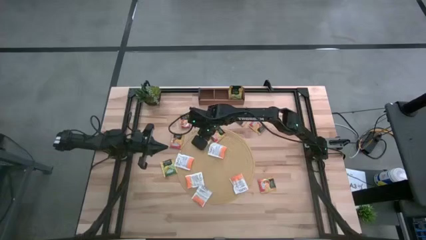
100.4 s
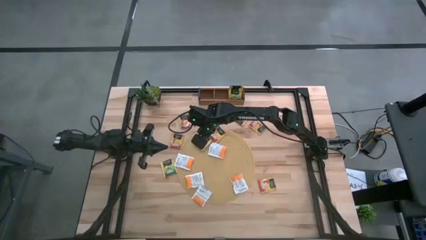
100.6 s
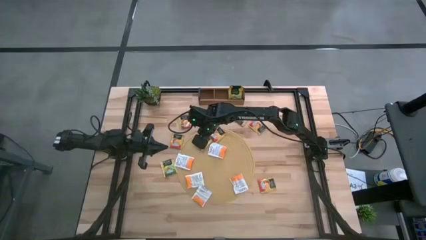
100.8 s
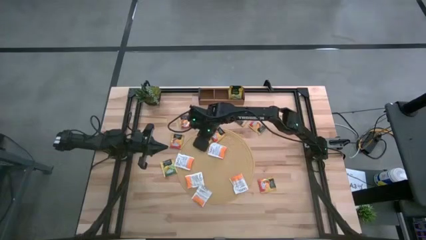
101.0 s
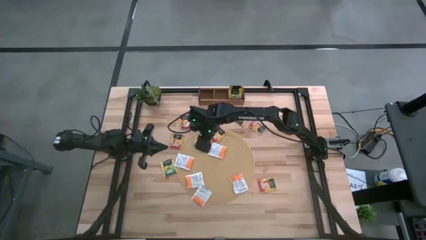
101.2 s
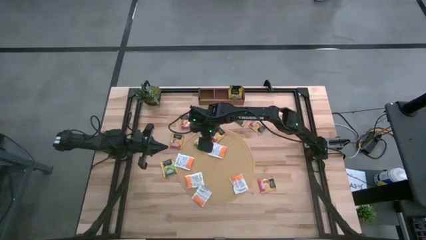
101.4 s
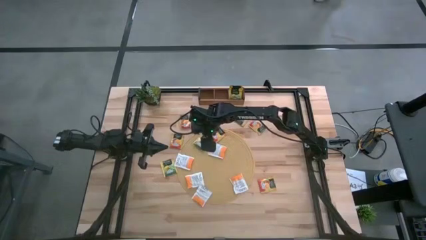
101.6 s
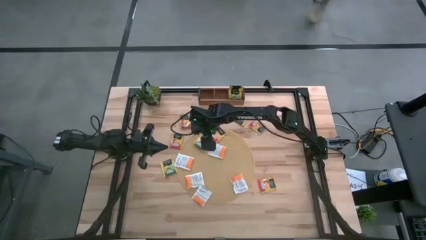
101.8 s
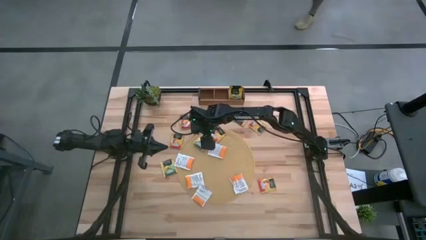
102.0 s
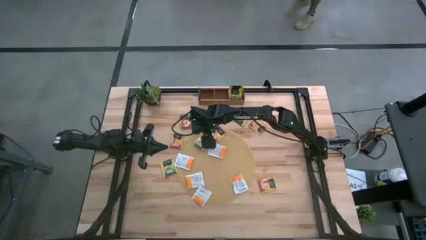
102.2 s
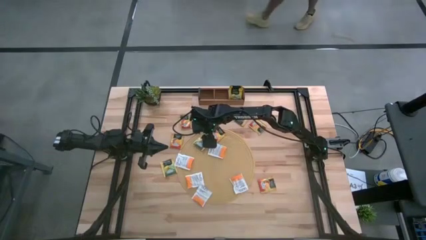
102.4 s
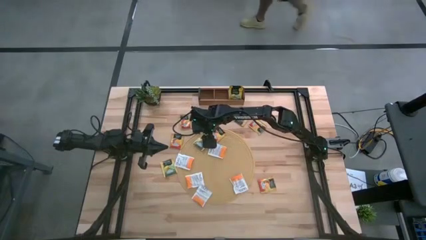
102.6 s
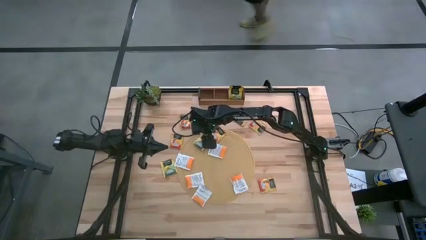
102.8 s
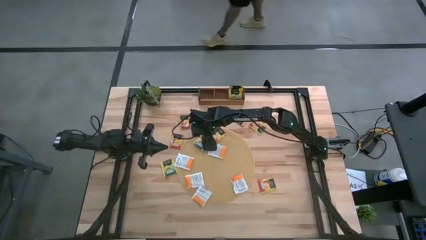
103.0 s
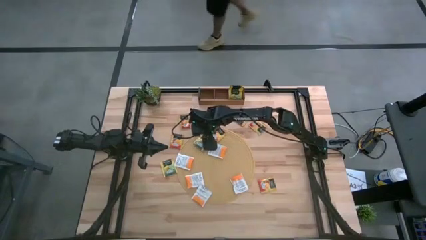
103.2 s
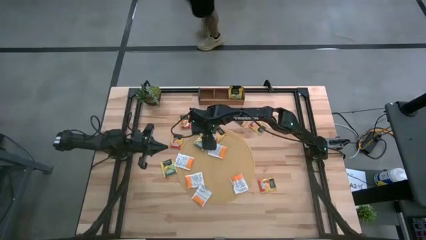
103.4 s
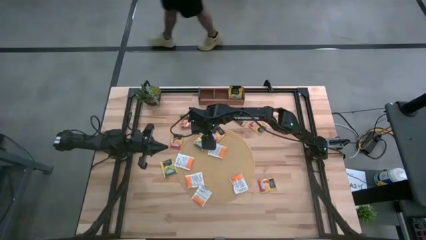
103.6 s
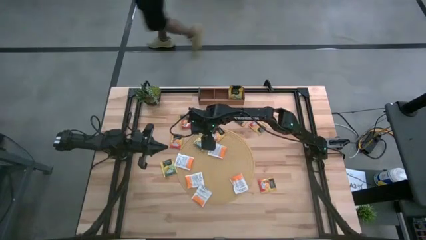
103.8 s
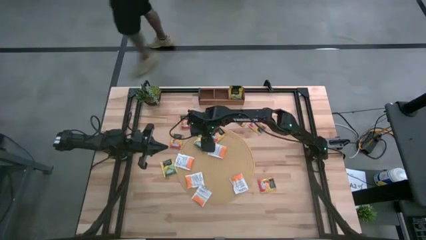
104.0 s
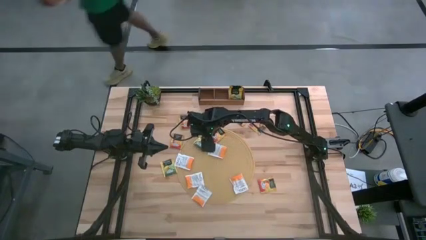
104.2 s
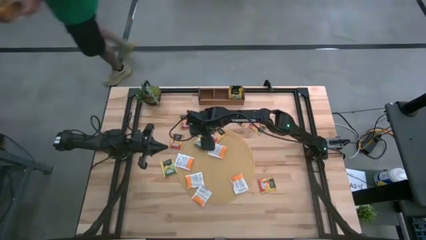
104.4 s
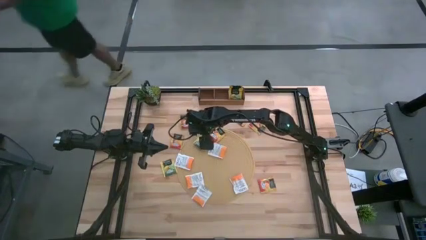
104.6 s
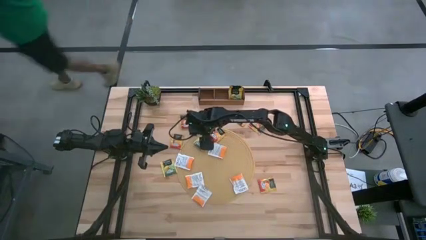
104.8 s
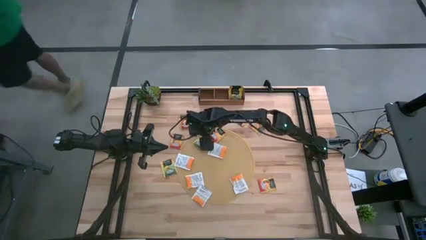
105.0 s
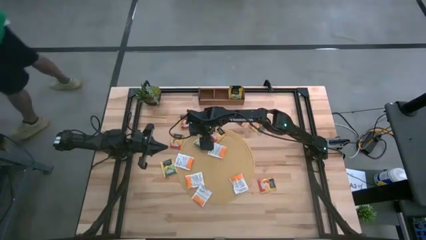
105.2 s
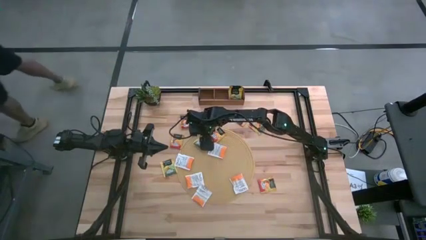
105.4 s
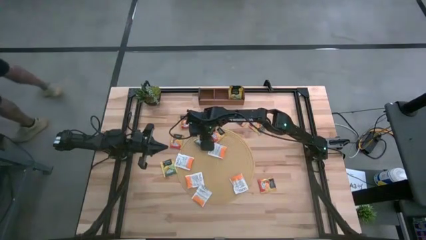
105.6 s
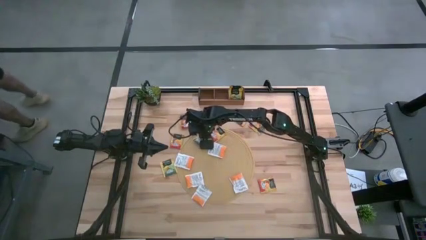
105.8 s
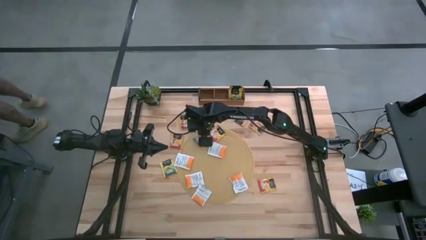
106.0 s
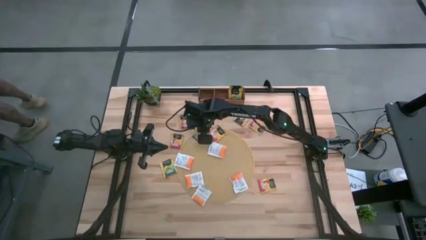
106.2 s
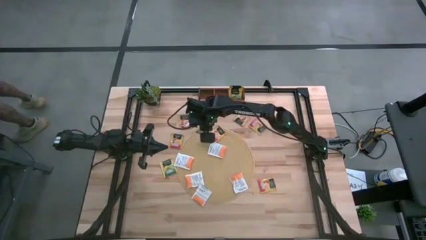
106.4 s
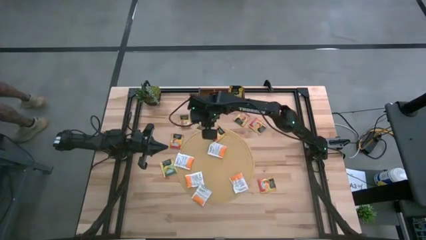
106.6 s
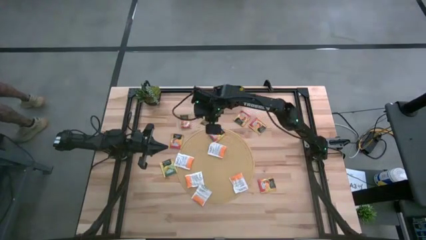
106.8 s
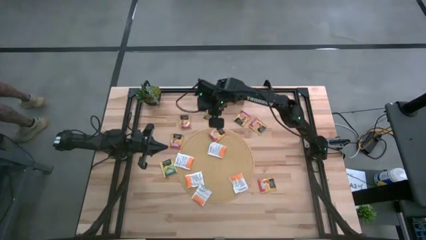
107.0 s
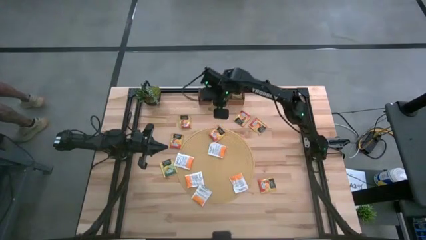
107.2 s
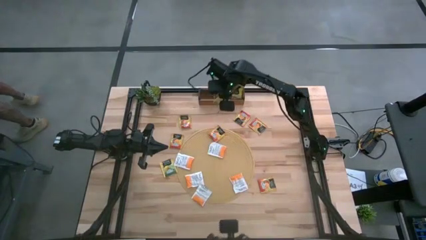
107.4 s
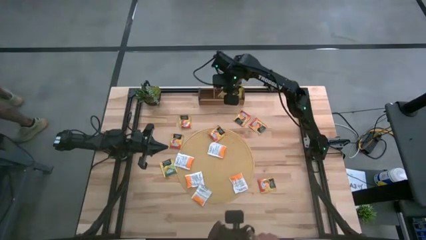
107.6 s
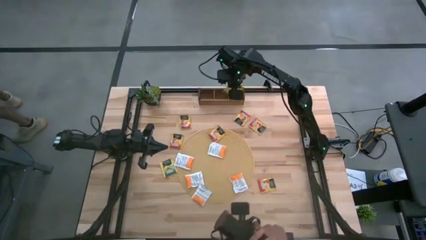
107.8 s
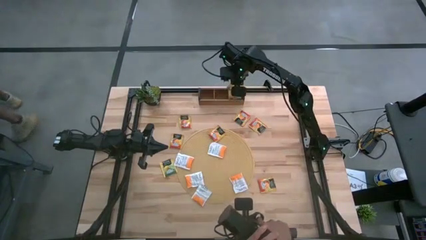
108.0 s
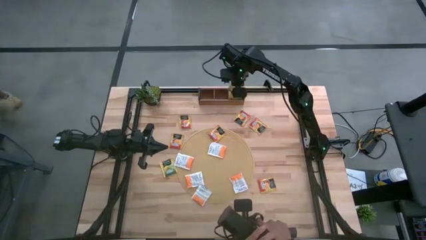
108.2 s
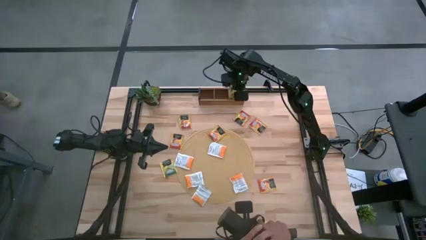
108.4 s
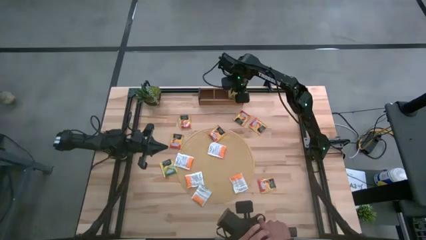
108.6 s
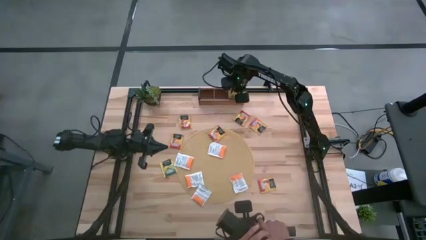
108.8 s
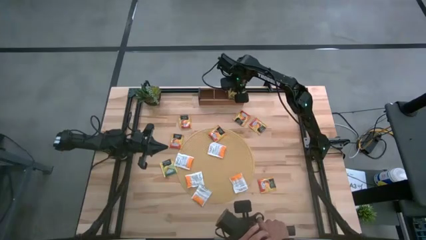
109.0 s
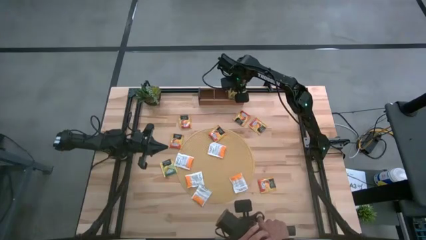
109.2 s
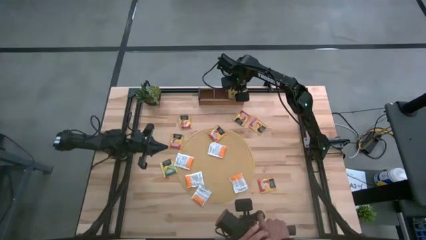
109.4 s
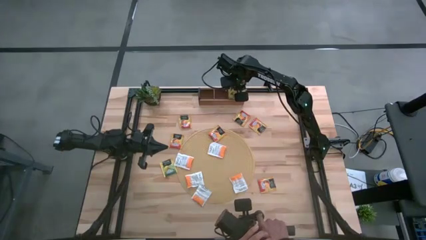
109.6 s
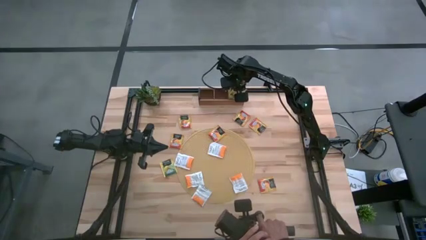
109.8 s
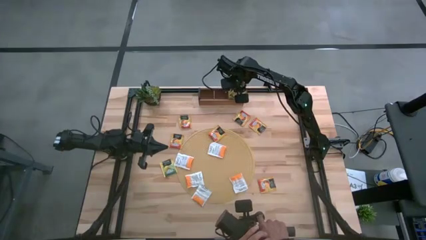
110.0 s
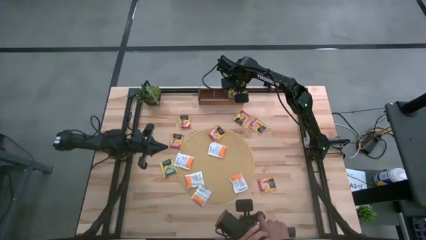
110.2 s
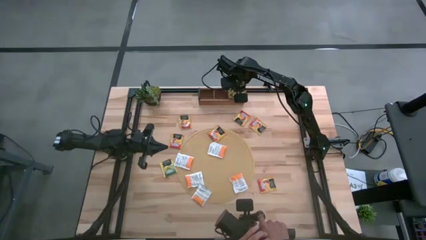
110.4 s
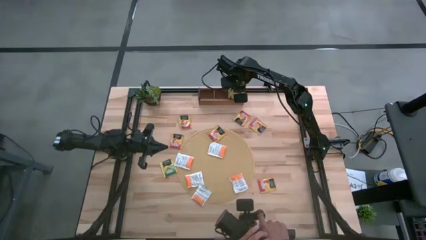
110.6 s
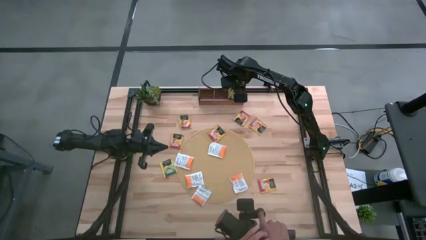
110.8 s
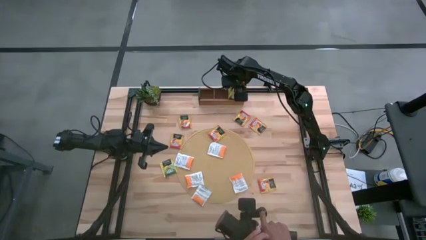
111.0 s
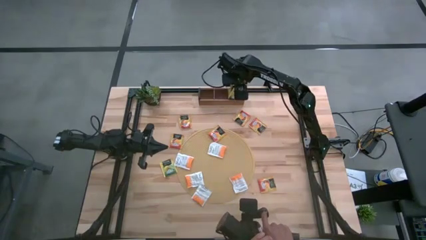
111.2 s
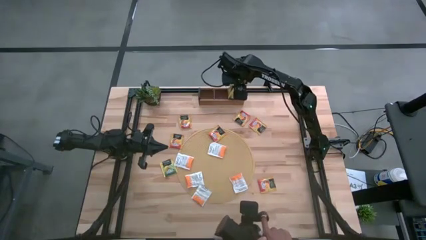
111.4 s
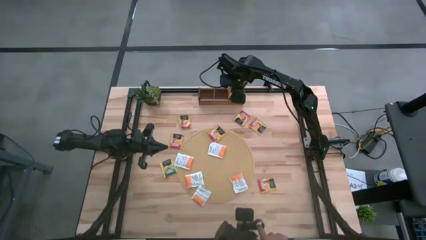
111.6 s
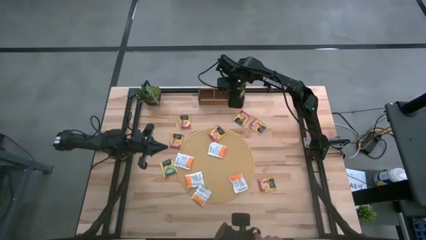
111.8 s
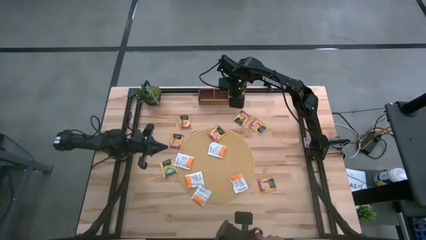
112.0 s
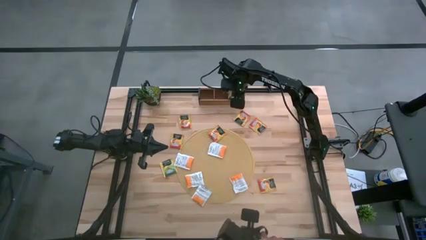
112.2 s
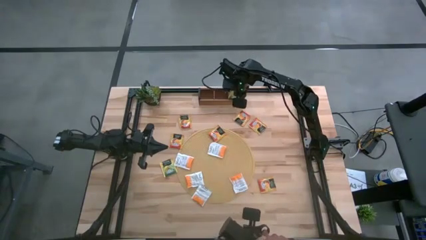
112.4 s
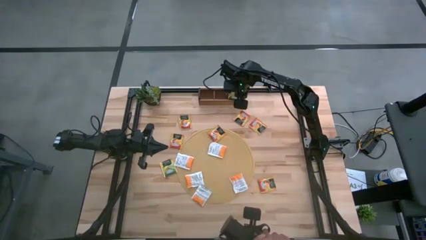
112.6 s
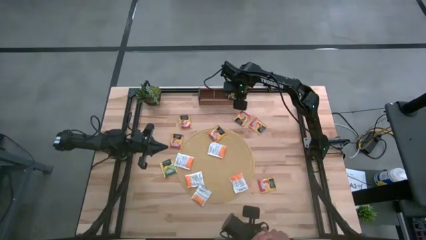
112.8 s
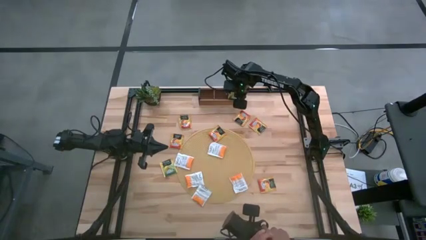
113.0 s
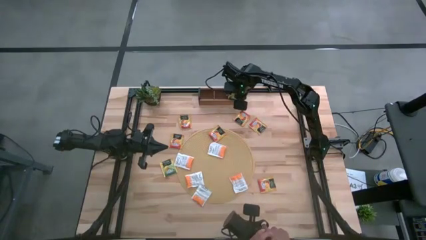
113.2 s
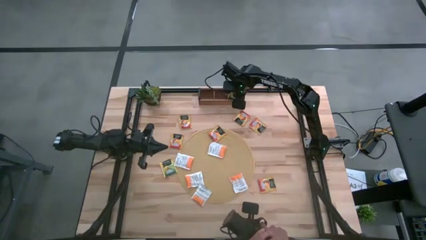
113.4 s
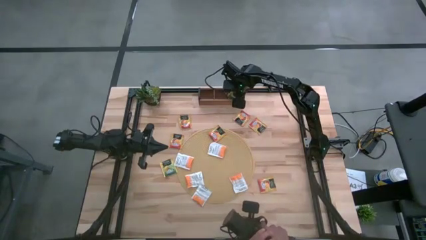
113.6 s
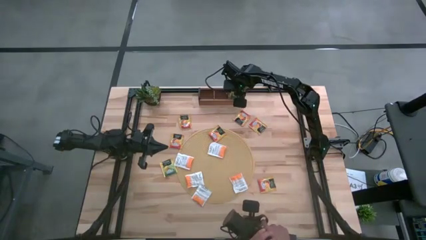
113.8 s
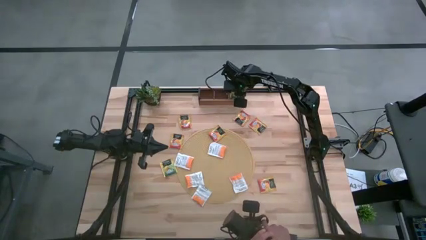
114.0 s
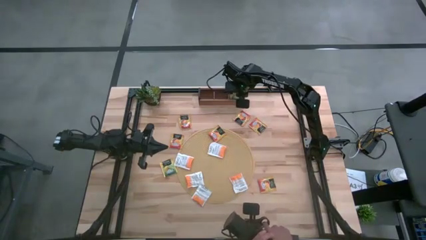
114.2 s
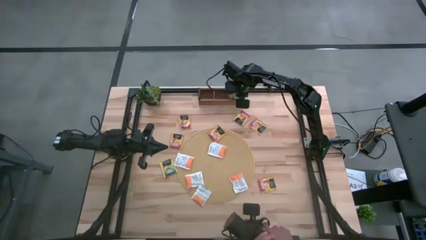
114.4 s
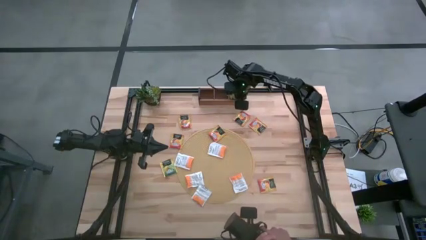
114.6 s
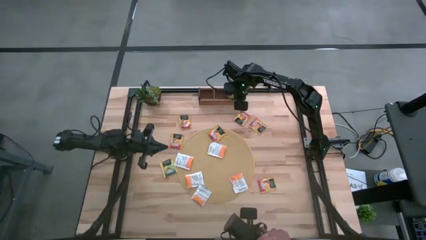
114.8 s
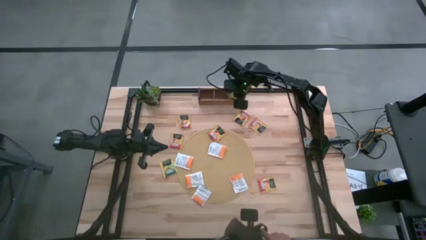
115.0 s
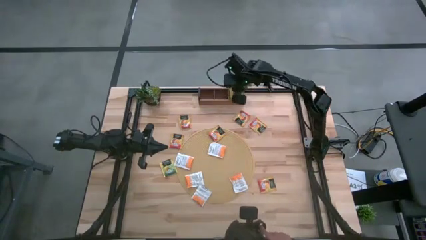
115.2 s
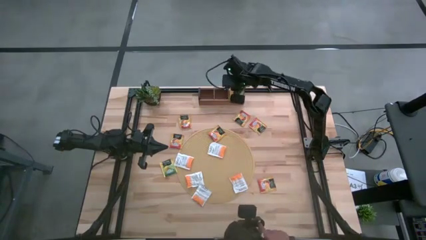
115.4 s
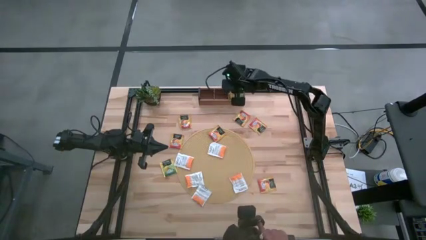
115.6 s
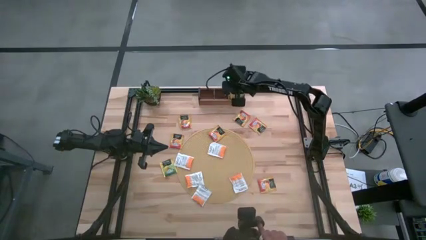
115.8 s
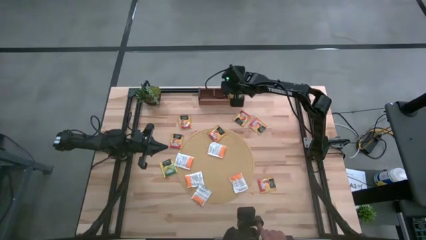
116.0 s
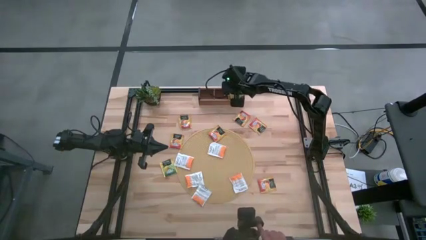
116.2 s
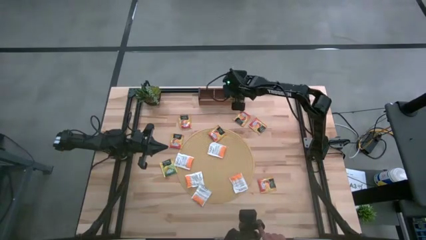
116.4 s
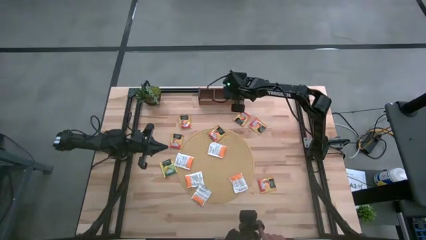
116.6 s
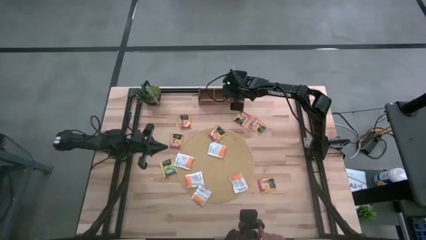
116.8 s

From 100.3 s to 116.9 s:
Task: Pick & Place Tea
Put the top yellow tea bag into the right section of the wooden organizer
